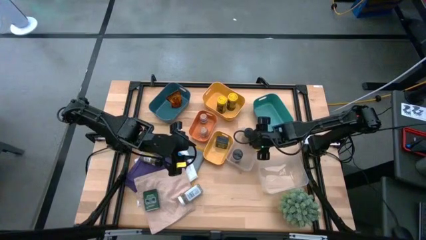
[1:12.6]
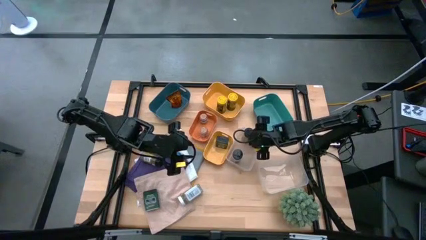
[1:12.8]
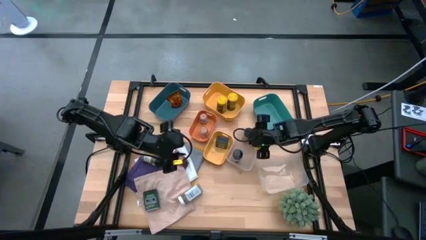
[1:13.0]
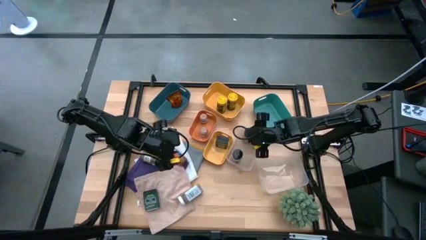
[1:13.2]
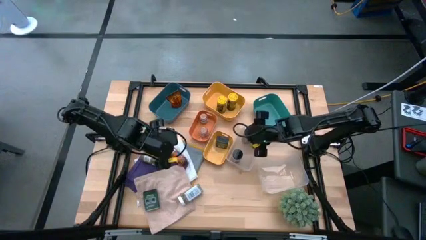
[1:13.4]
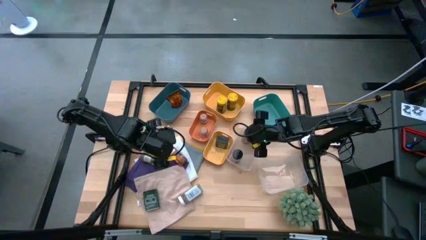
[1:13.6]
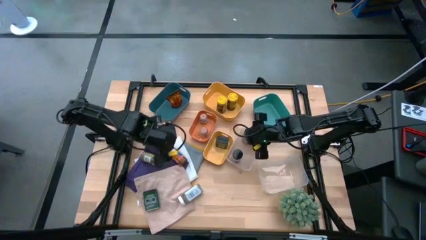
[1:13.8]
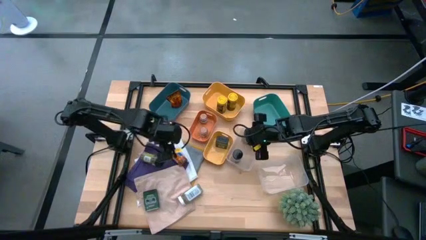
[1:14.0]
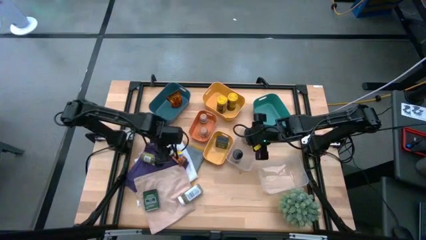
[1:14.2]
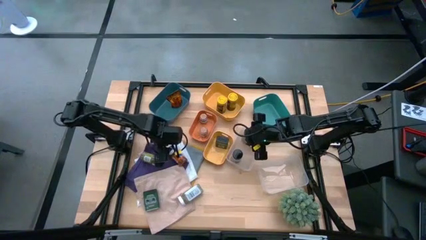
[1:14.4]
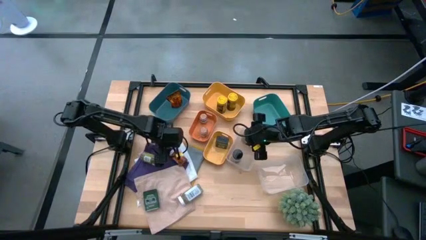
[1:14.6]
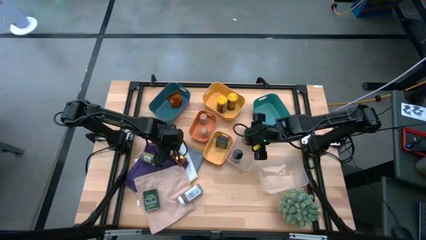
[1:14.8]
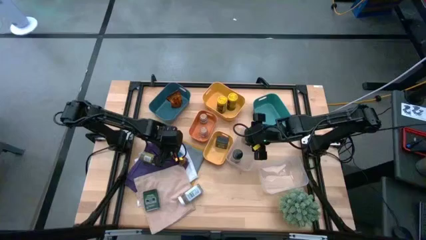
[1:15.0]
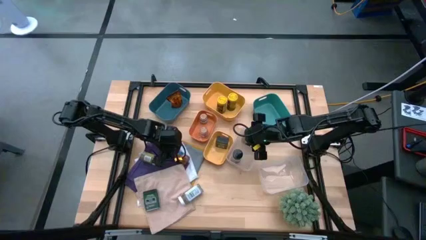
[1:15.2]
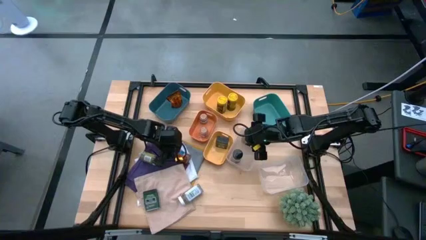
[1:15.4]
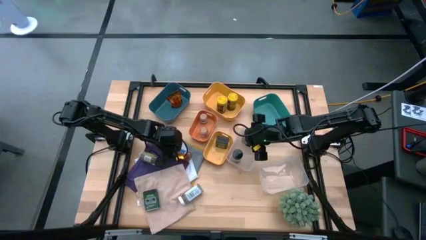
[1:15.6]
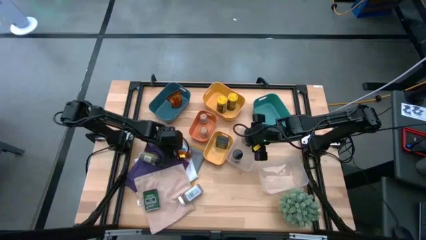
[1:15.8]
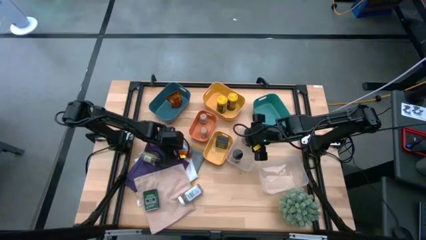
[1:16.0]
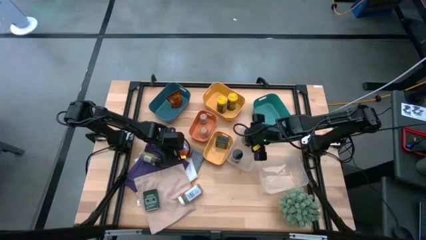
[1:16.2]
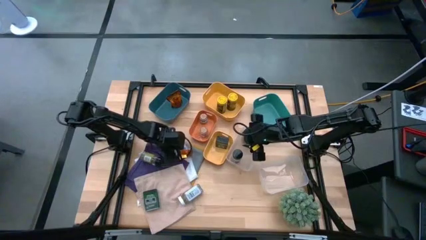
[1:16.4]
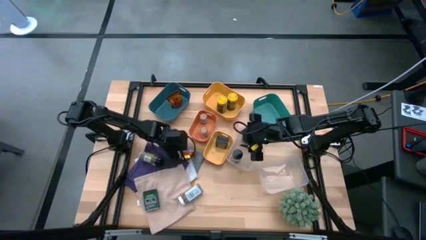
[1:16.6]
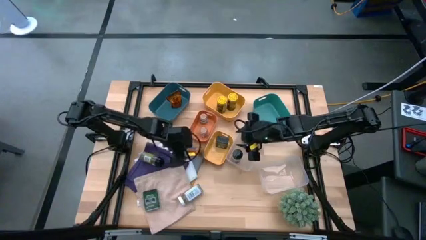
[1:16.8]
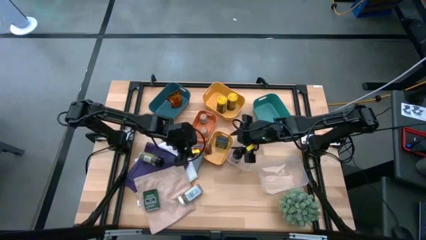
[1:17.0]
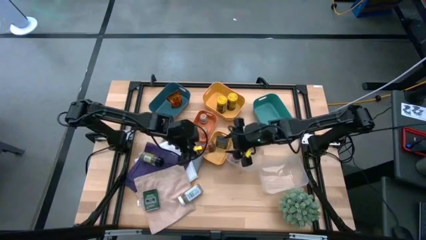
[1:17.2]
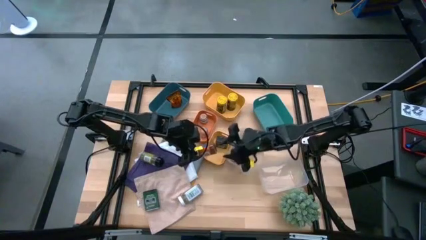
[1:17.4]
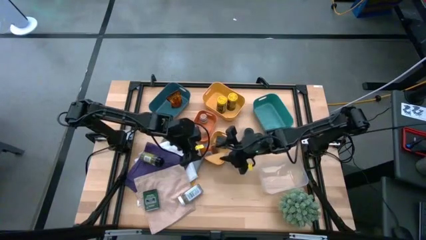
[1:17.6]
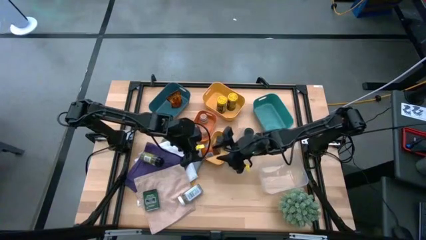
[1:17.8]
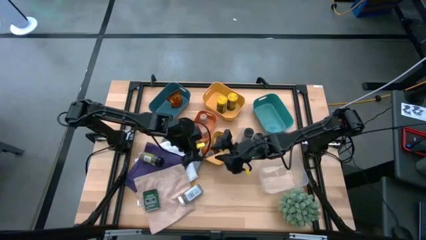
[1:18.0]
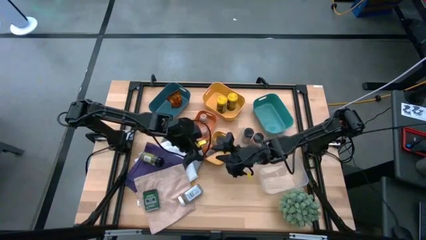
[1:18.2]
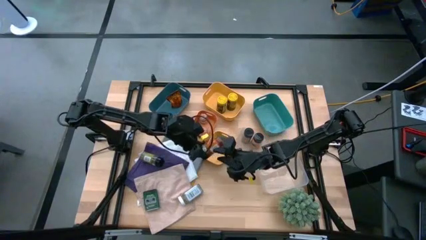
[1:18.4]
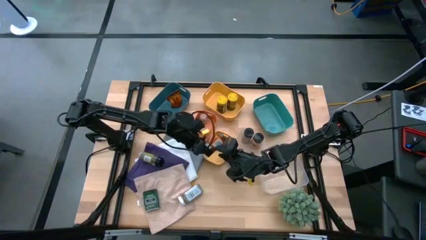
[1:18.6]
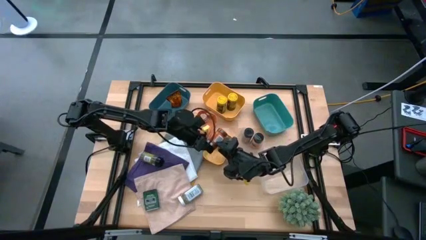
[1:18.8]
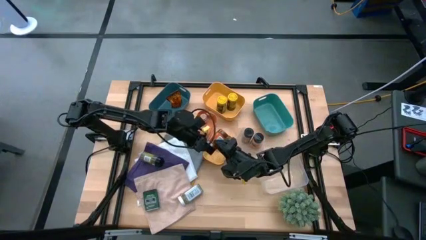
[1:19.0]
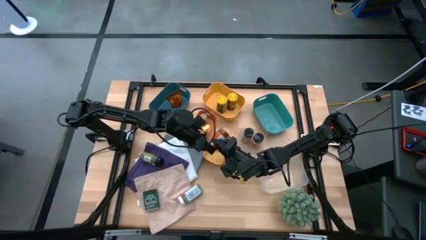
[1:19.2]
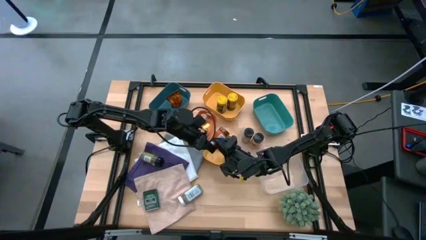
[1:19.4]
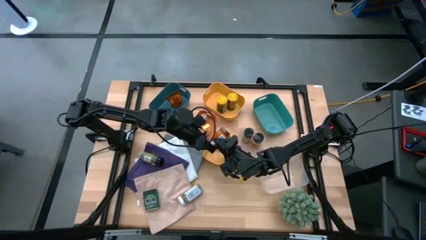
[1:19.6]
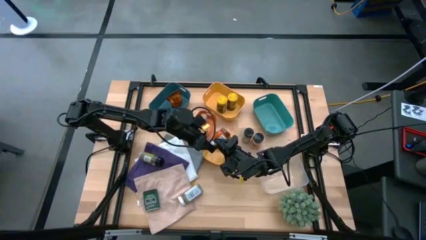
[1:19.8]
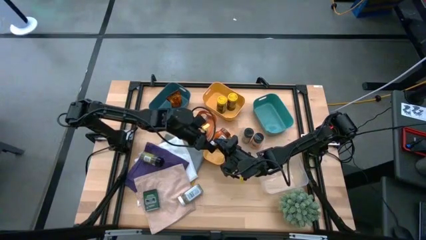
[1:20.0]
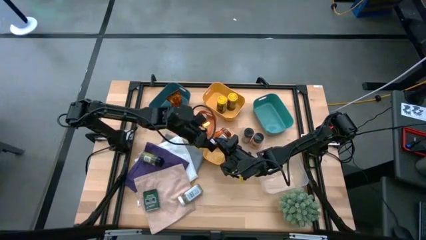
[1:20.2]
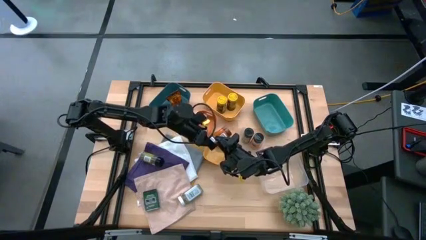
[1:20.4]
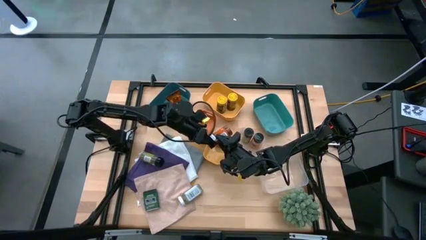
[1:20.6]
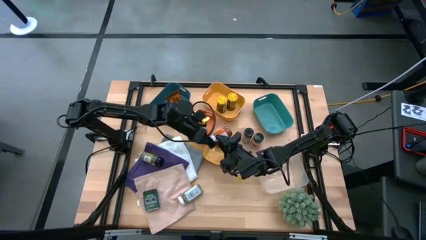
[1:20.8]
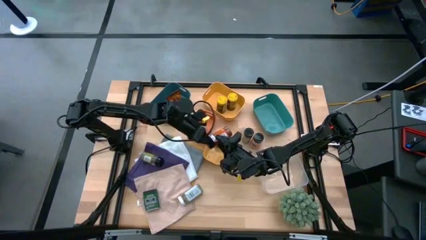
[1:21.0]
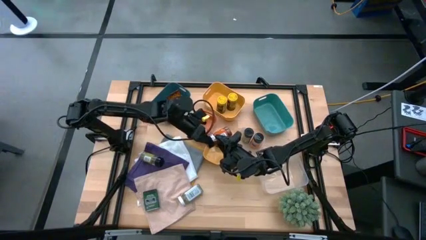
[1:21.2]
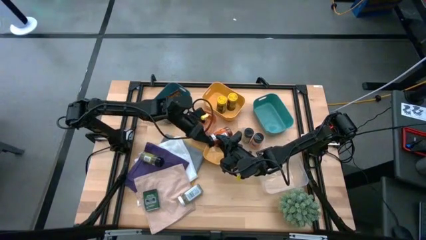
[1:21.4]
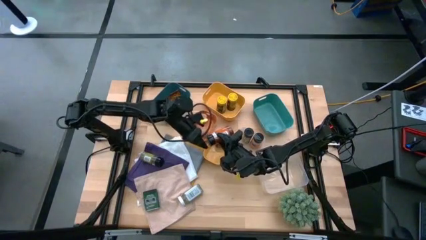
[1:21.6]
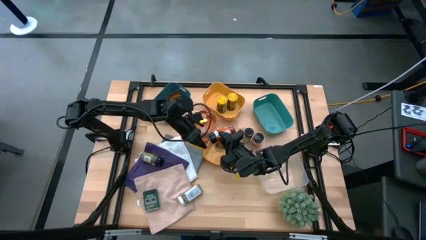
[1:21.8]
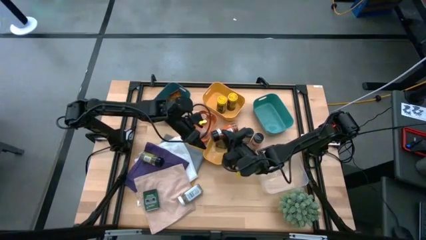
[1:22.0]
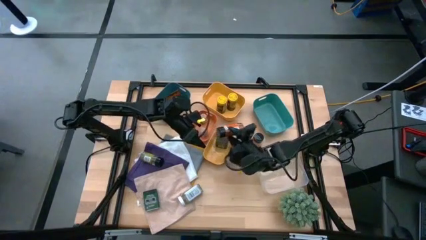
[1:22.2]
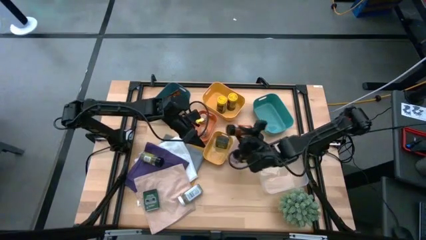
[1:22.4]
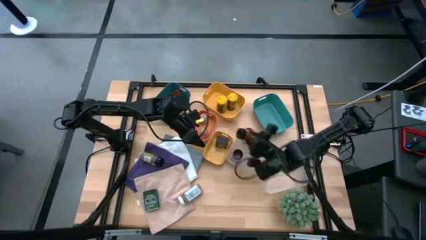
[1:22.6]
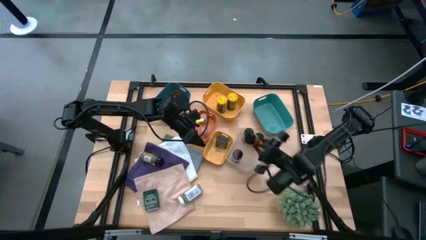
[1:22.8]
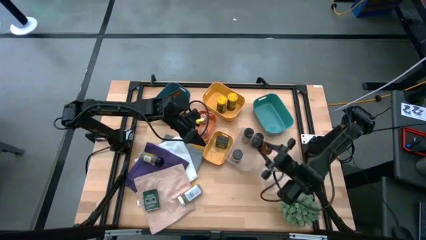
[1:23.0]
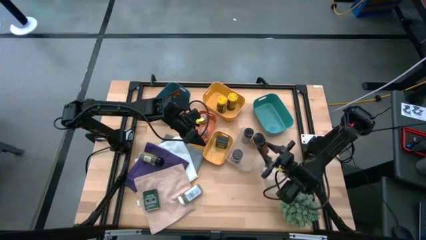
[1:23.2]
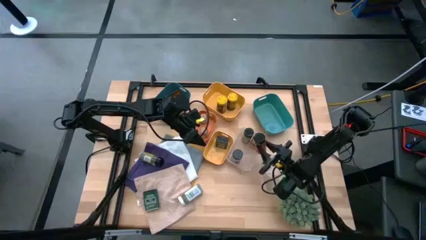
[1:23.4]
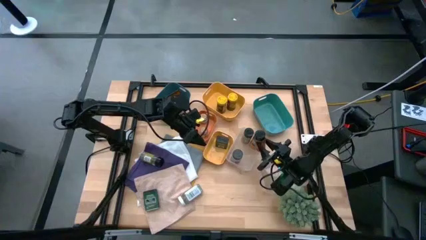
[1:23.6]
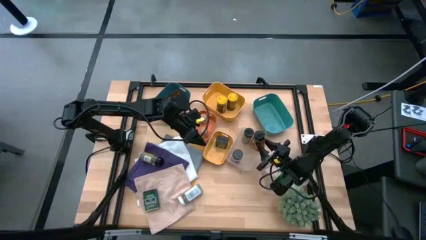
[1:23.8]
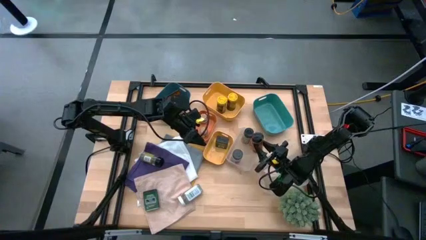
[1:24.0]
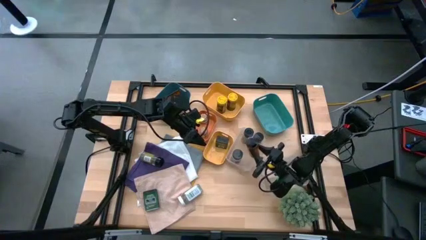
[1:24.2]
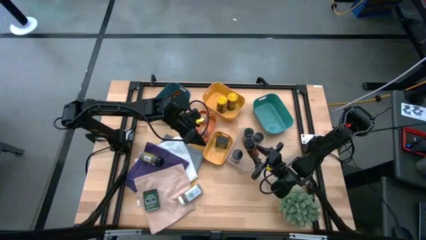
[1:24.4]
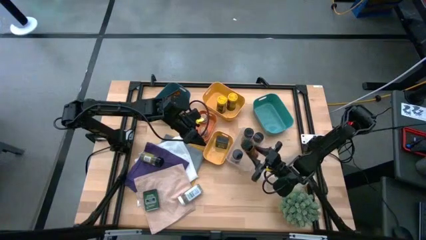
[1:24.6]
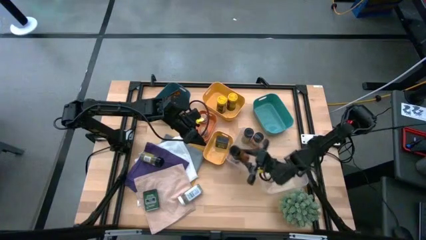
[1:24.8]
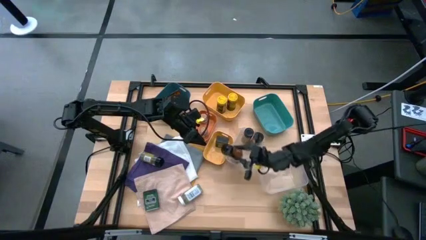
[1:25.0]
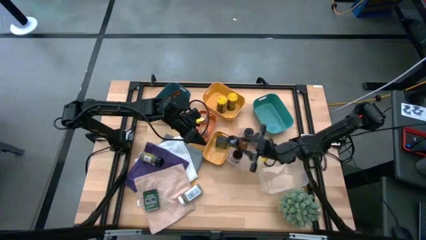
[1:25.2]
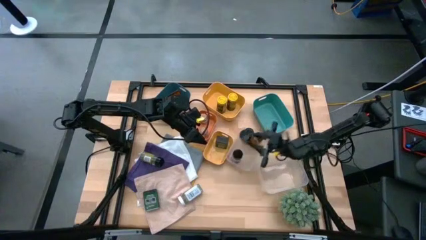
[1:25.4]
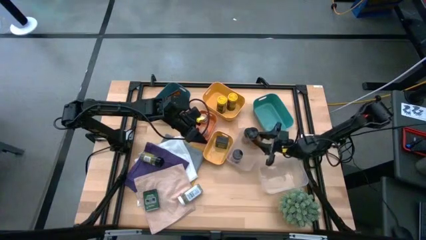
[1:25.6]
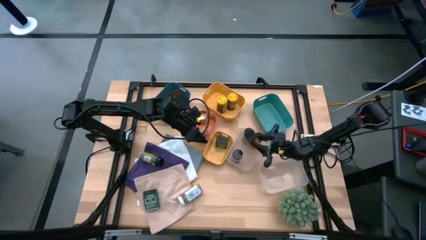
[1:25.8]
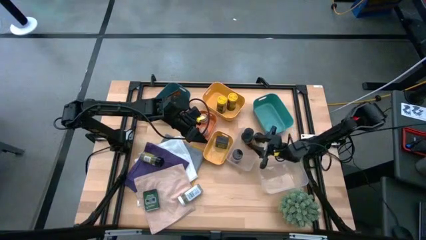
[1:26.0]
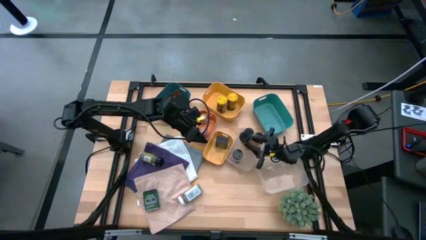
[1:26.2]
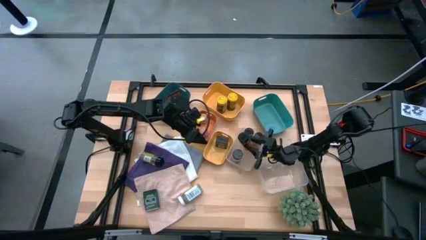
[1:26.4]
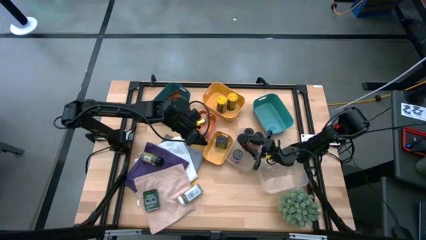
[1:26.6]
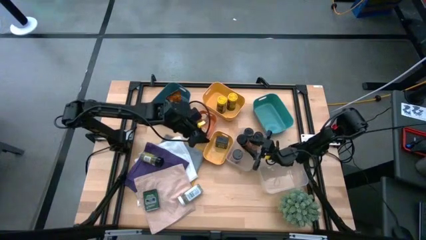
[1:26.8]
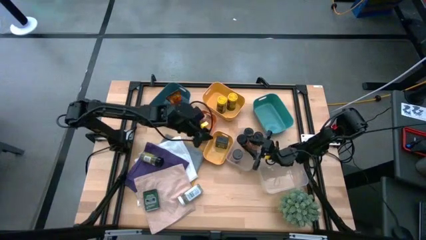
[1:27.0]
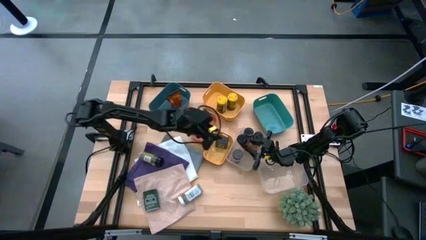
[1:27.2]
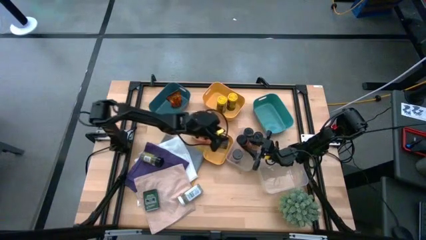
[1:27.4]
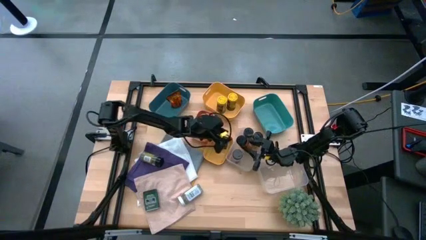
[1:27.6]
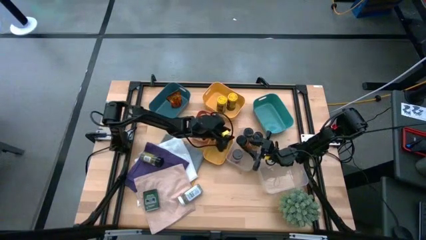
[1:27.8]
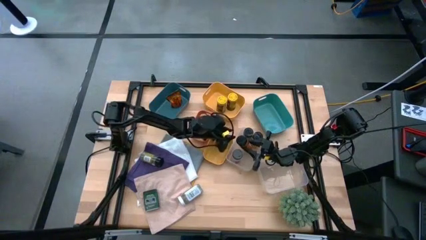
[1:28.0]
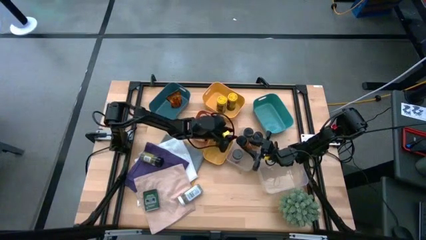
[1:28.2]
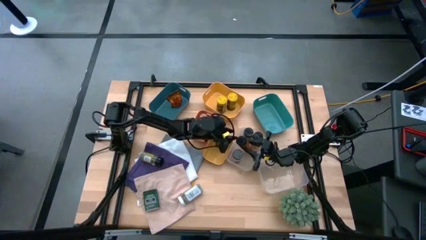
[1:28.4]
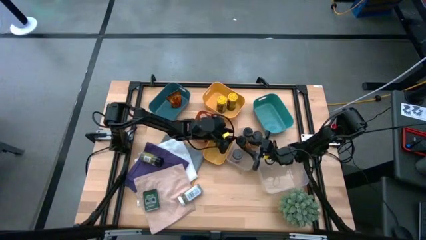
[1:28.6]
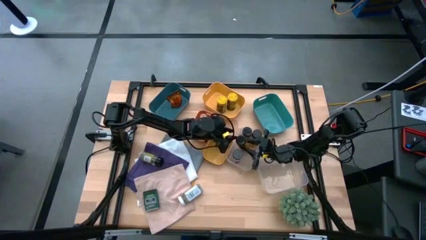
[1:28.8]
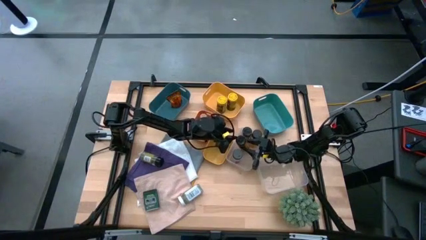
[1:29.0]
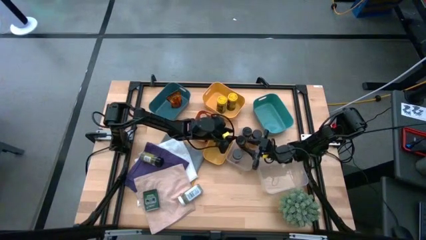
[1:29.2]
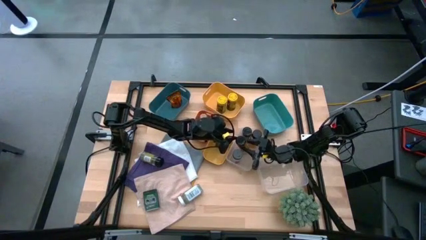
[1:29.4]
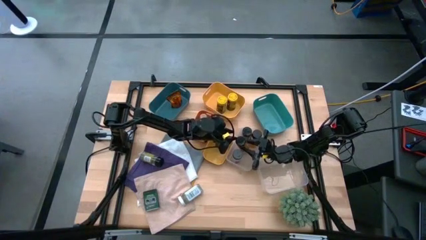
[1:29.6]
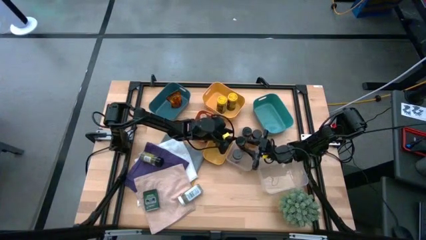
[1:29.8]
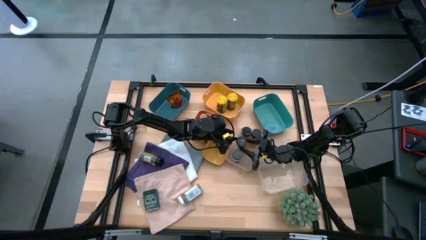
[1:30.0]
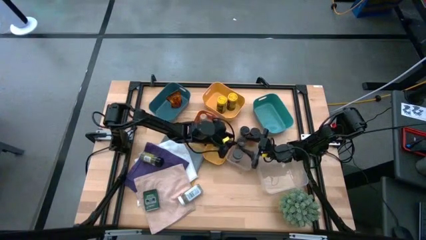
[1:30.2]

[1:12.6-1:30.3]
Task: Sort spices by type
Put the black seasoning bottle into the left white bin
